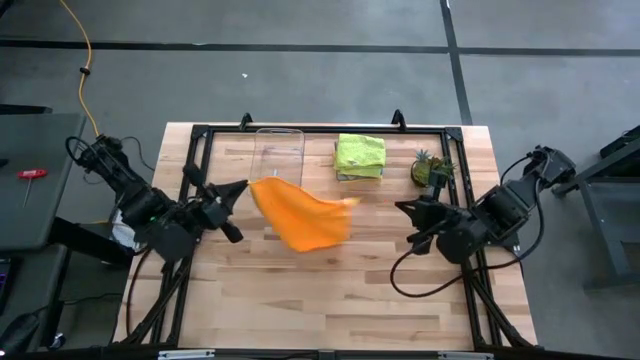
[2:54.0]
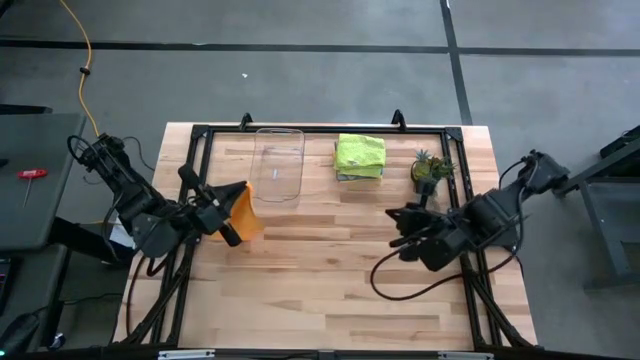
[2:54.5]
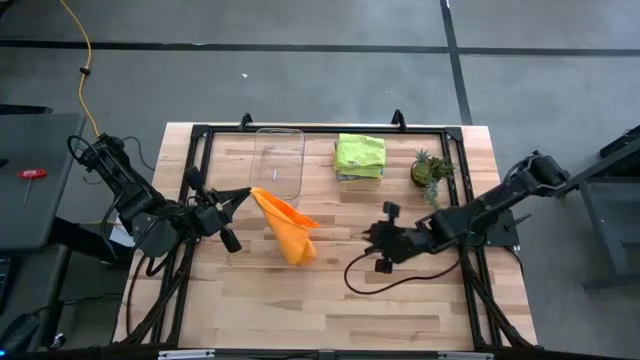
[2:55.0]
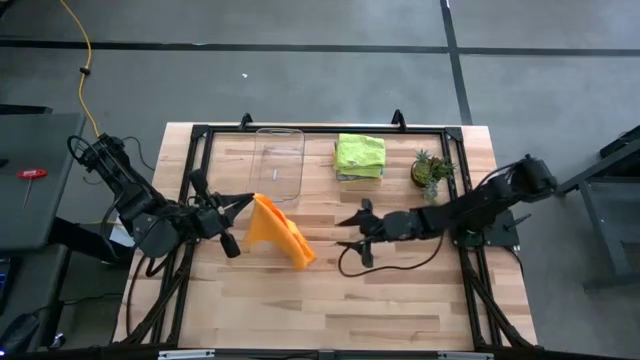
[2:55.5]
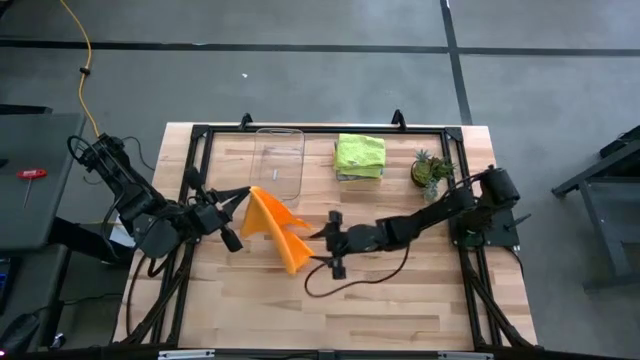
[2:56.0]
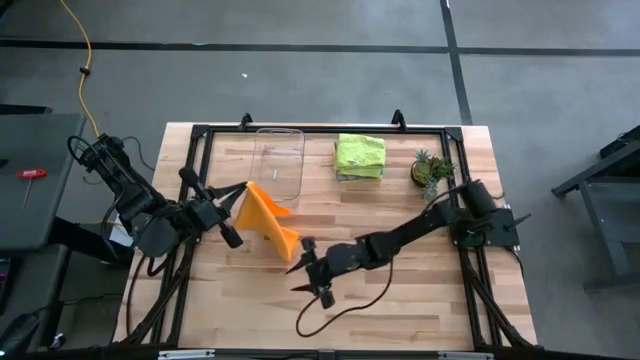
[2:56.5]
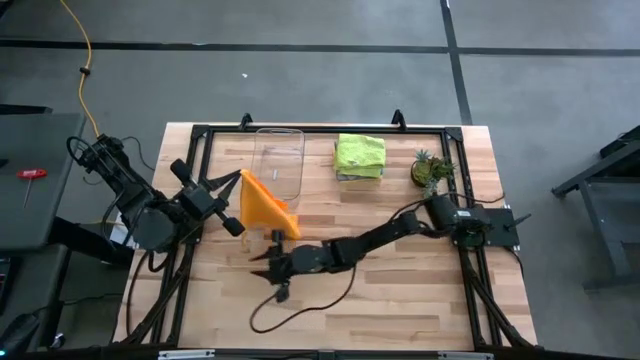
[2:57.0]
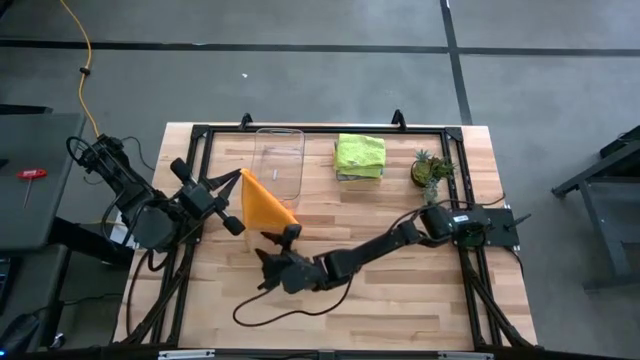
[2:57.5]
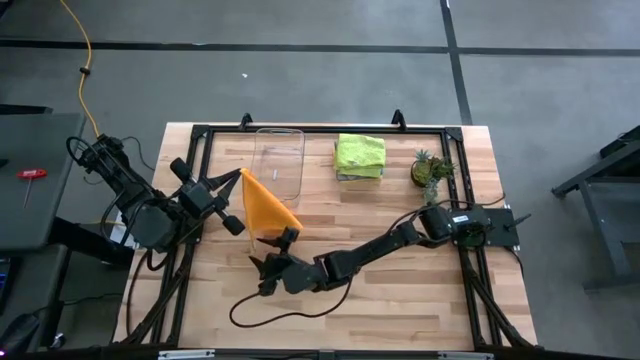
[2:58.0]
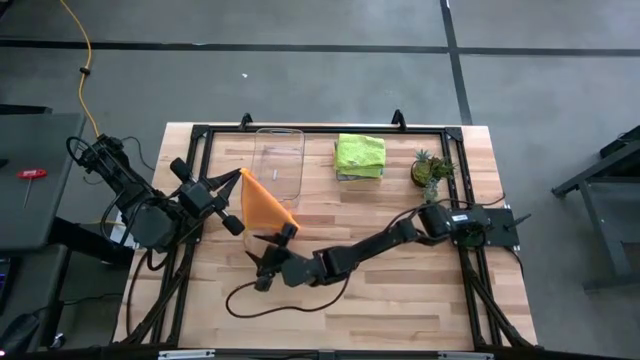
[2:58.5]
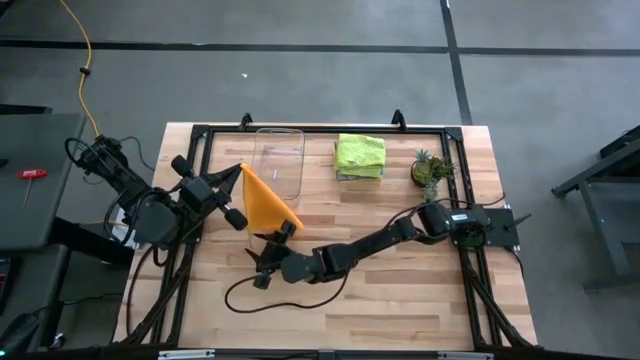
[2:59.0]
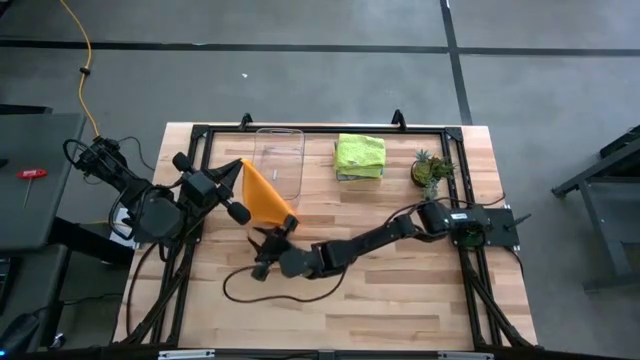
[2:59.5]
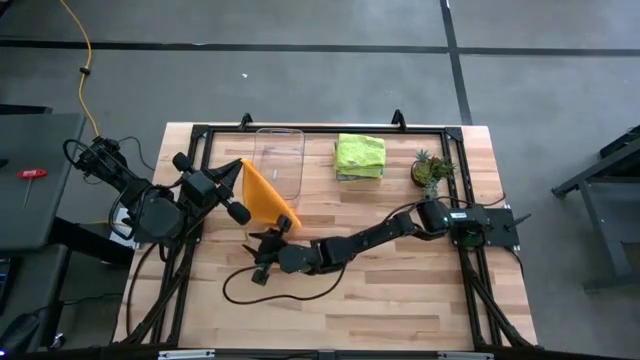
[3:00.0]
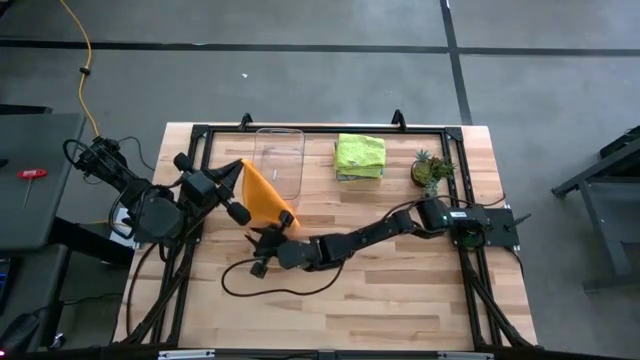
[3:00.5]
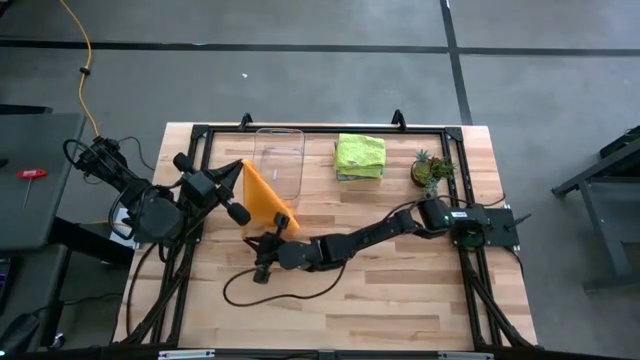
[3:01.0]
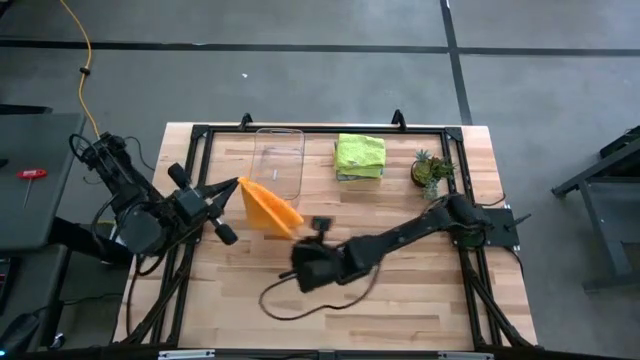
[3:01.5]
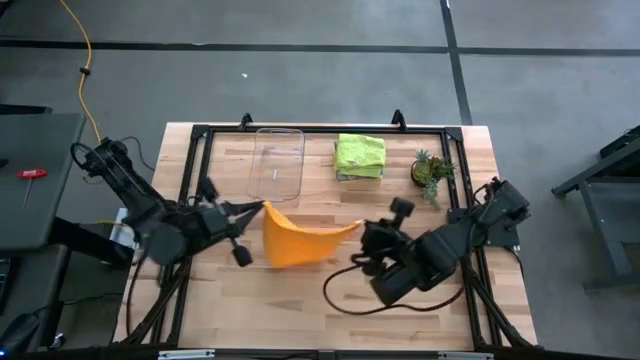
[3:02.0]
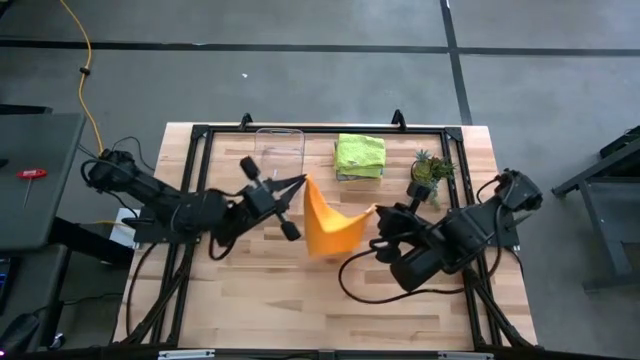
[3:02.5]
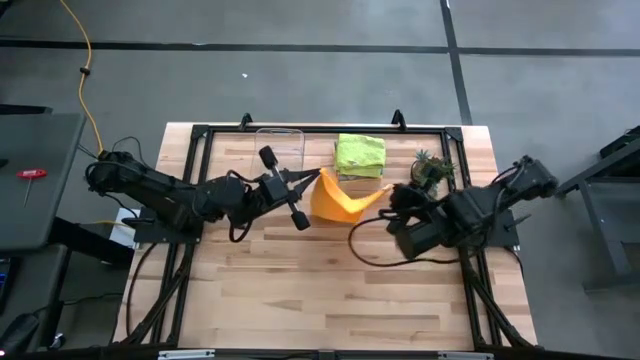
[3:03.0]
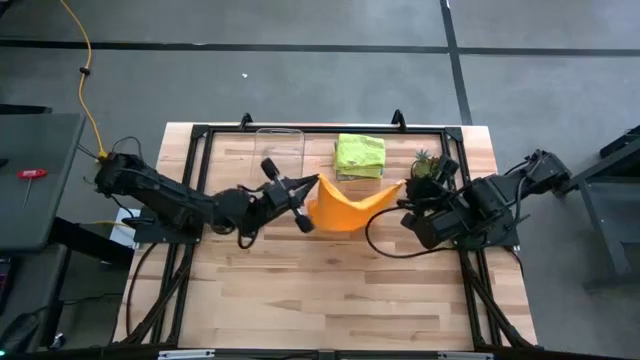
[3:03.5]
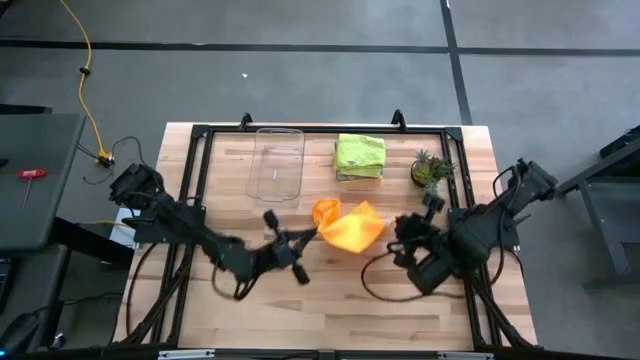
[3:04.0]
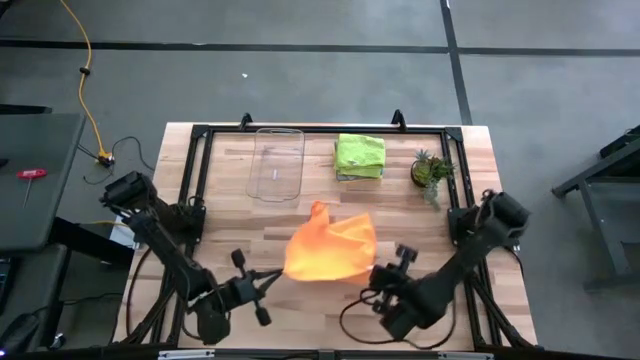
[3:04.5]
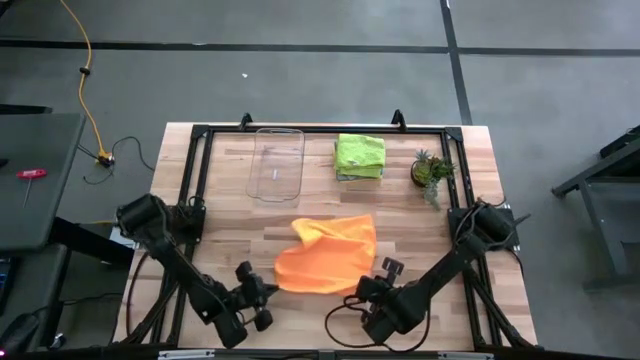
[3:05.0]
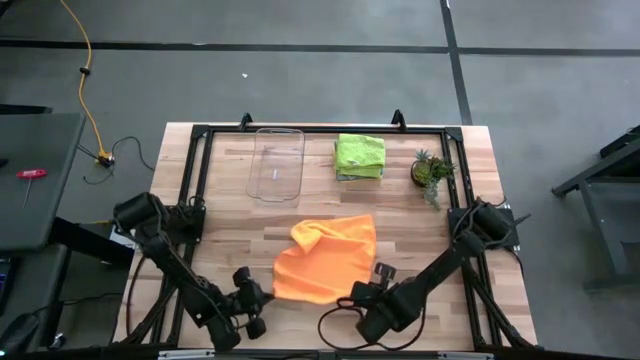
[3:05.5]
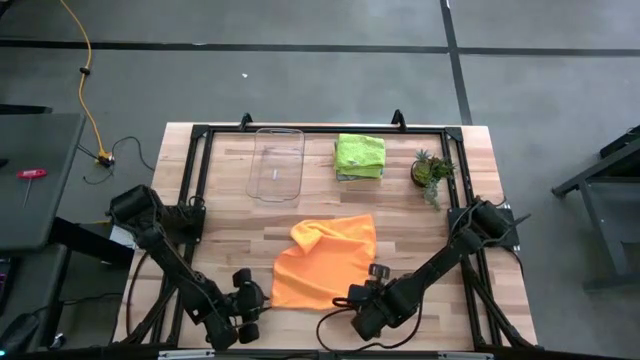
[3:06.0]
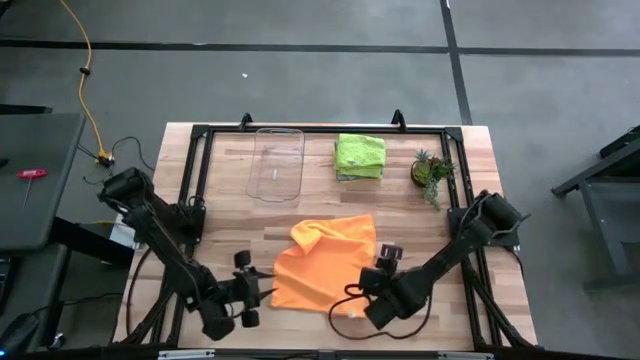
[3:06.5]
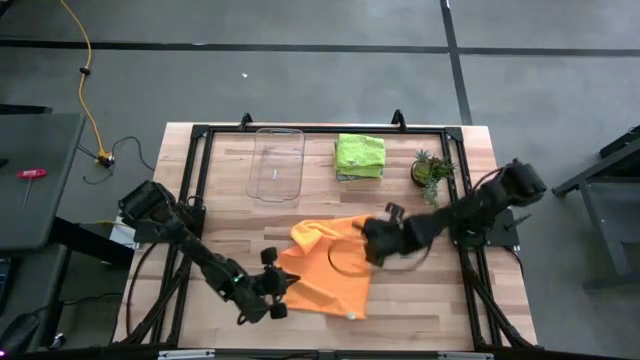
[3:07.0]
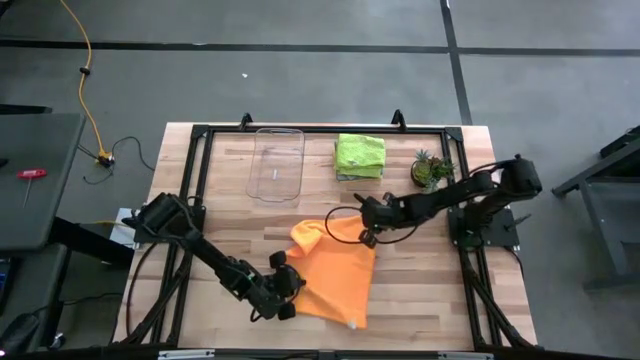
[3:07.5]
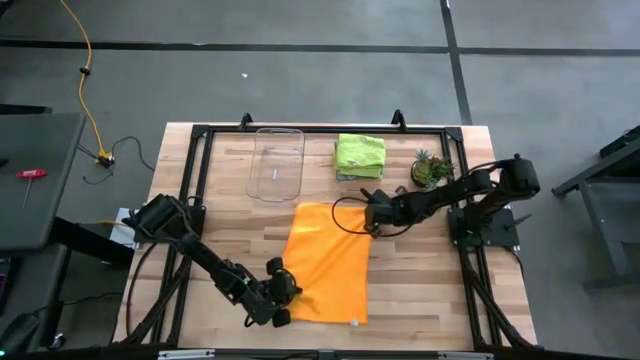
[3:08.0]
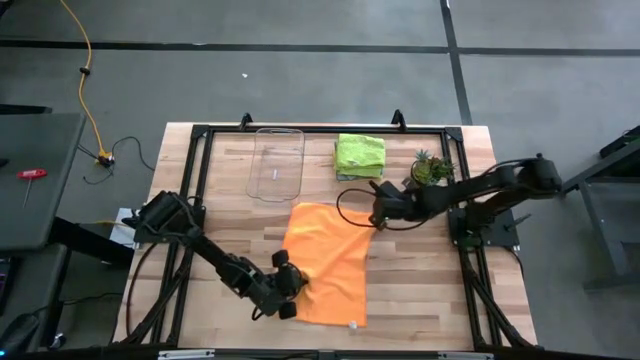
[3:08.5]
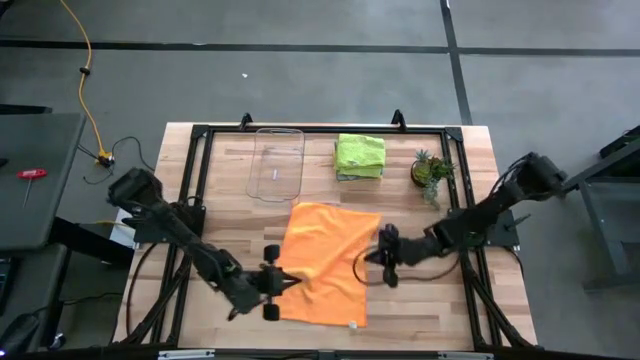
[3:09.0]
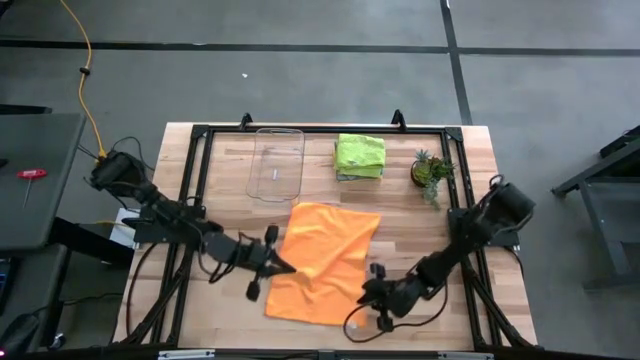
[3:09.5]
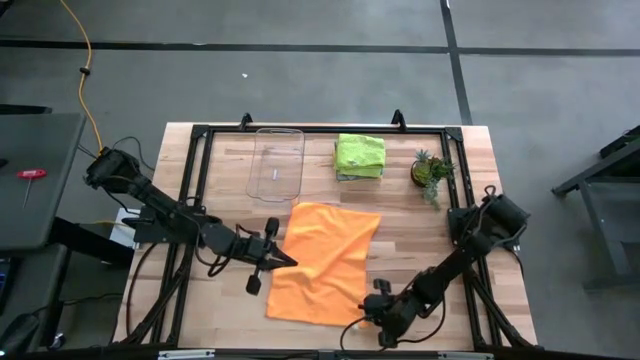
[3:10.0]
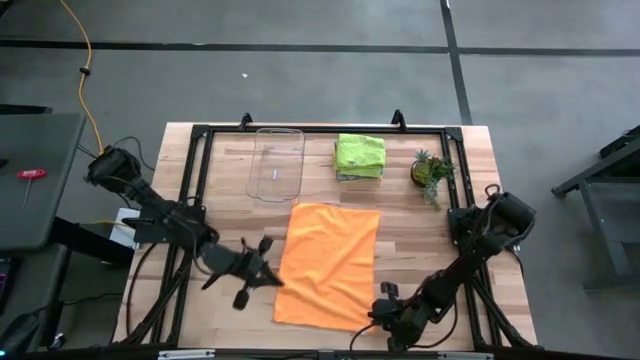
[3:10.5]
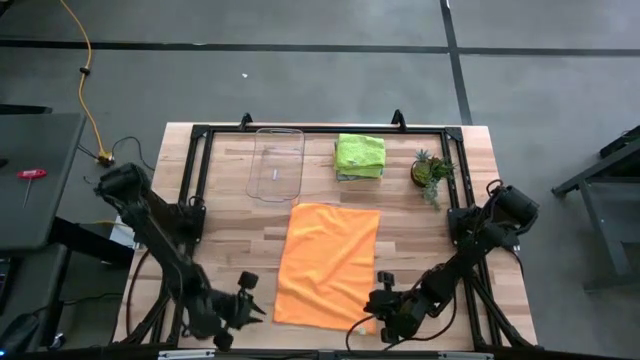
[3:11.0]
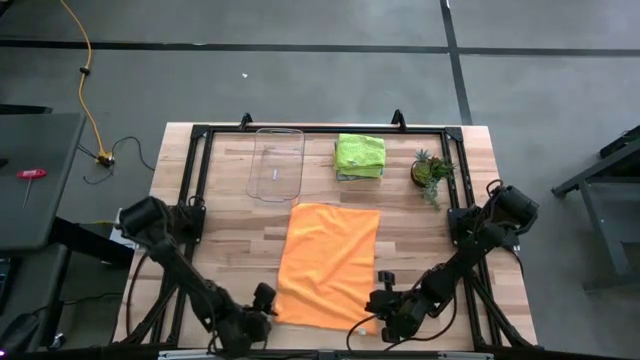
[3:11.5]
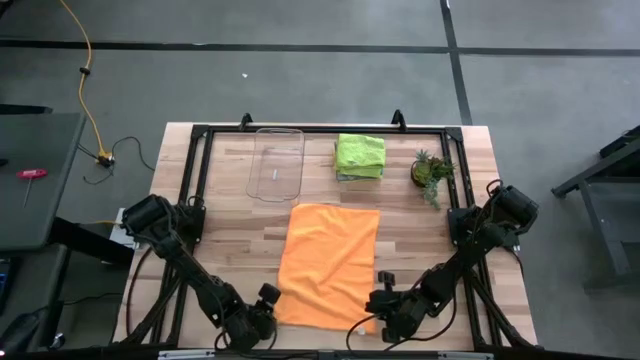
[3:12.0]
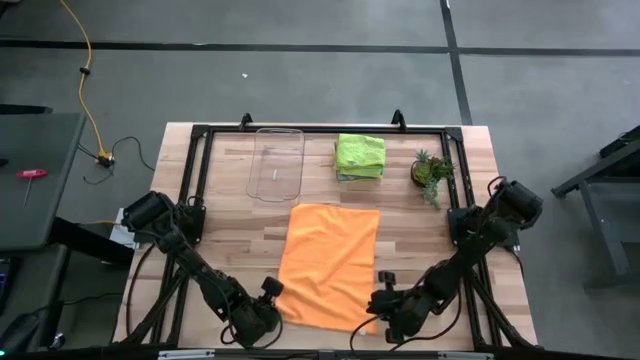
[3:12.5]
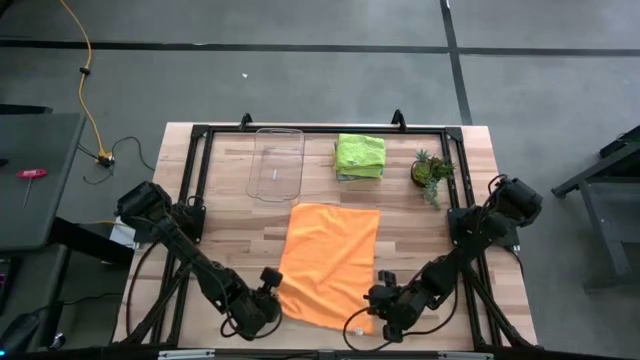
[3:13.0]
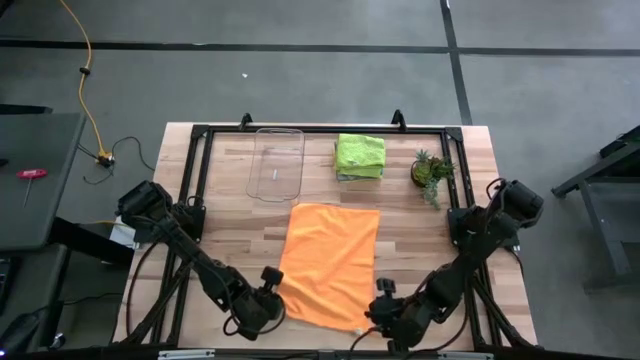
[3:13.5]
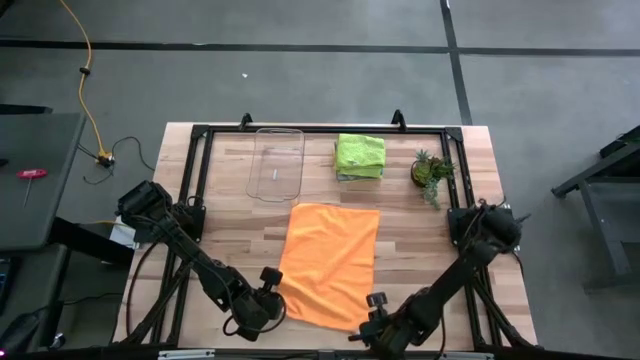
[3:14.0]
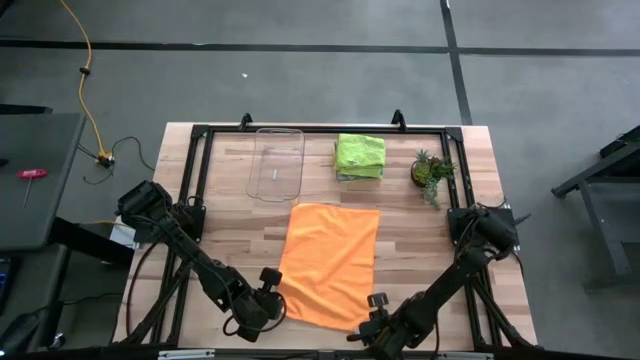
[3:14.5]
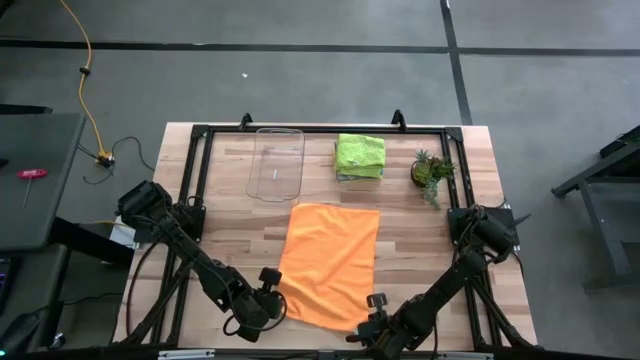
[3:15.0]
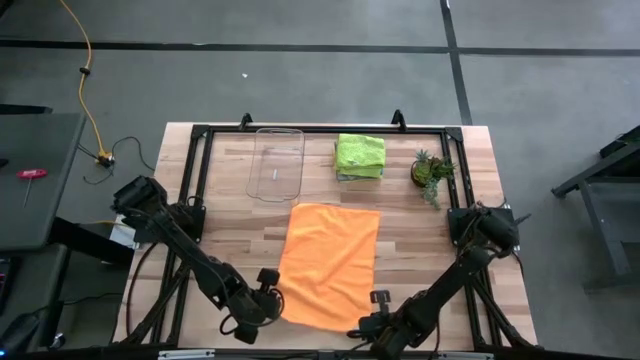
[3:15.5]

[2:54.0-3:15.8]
Task: Fold microfiber towels
Fold the orange microfiber cloth
